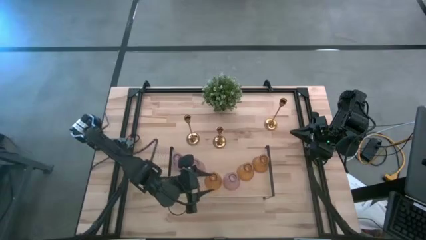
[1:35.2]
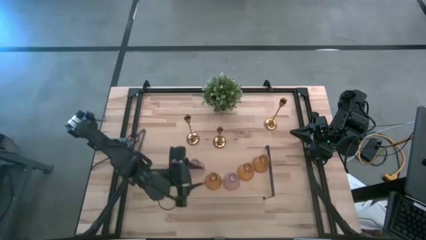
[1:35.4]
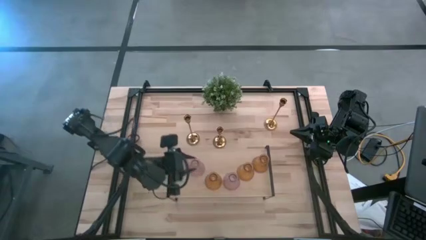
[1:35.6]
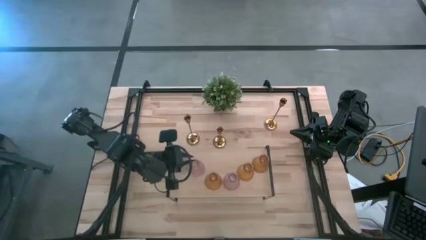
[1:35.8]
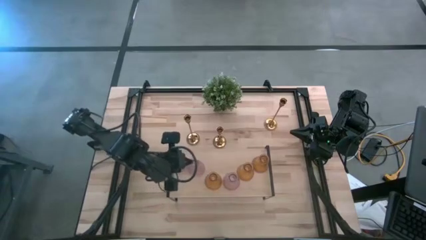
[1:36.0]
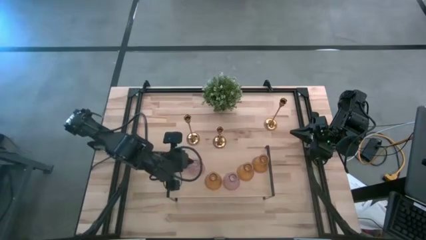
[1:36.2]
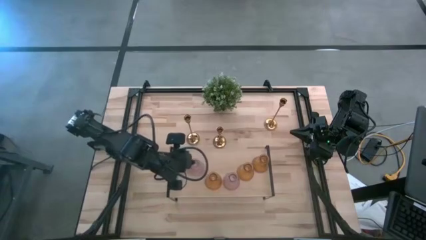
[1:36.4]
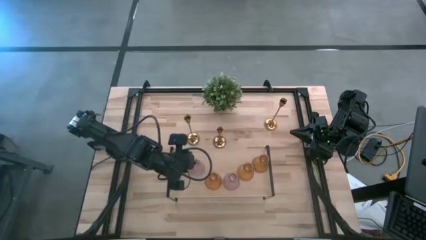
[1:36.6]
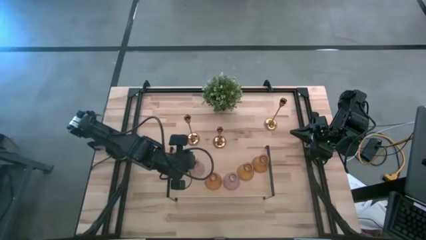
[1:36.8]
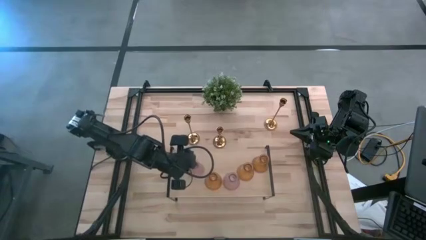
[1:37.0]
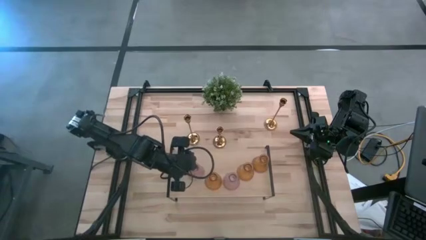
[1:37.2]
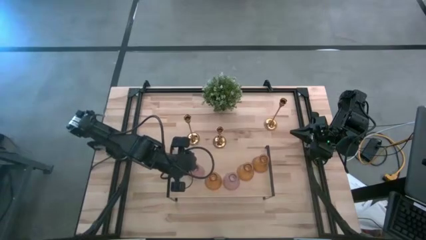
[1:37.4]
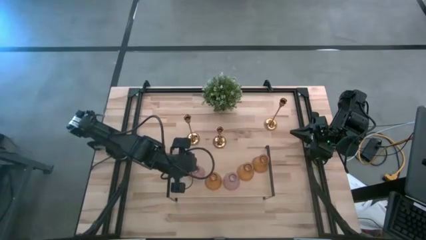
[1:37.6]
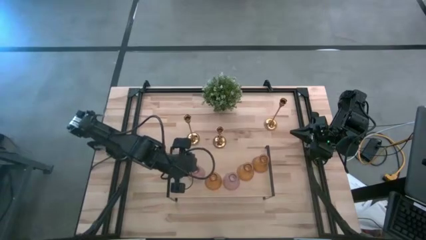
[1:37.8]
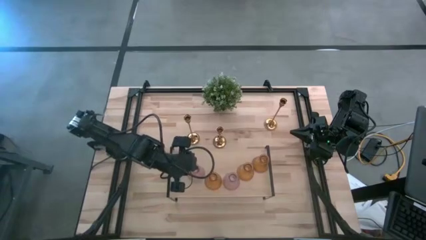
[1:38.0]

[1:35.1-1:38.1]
Task: Pick & Place candle stick holders
Adjust the violet candle holder on the shelf

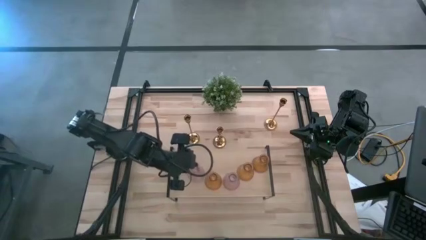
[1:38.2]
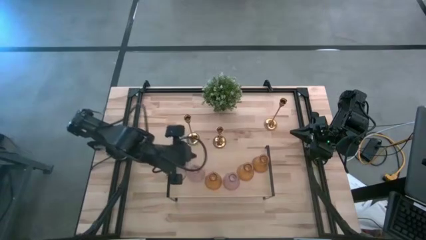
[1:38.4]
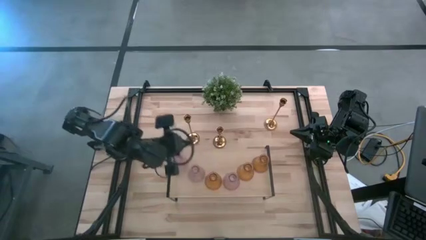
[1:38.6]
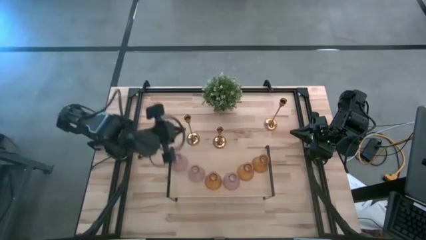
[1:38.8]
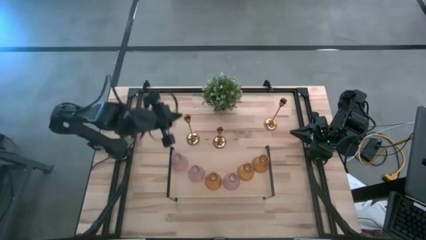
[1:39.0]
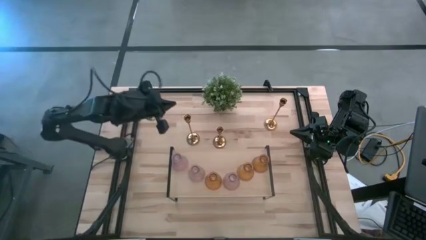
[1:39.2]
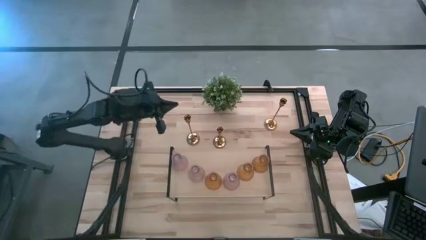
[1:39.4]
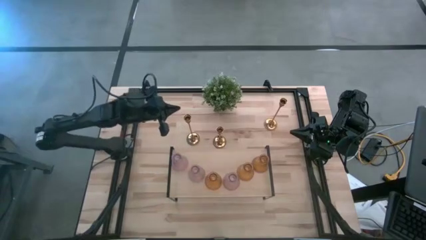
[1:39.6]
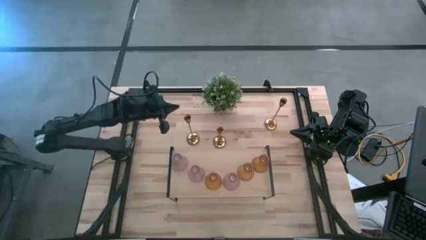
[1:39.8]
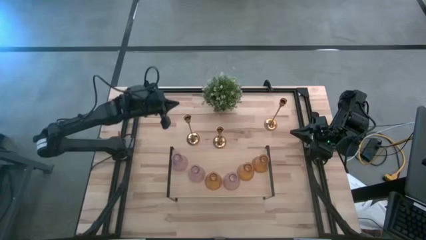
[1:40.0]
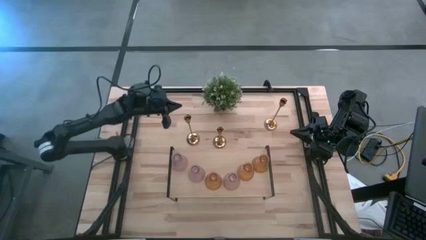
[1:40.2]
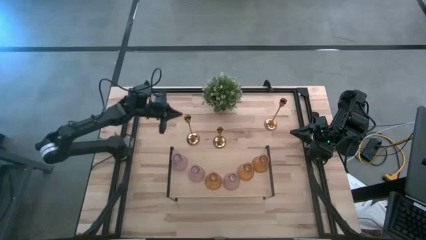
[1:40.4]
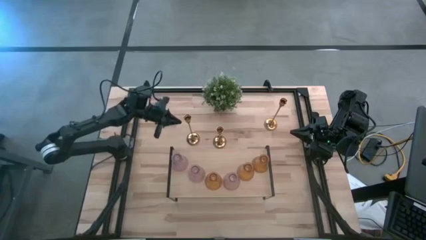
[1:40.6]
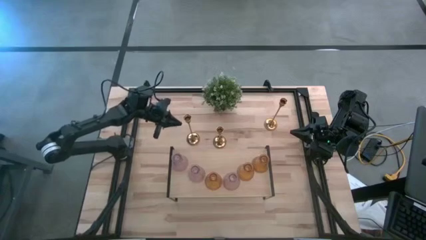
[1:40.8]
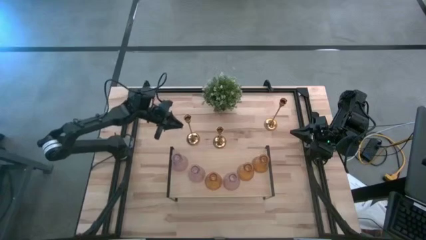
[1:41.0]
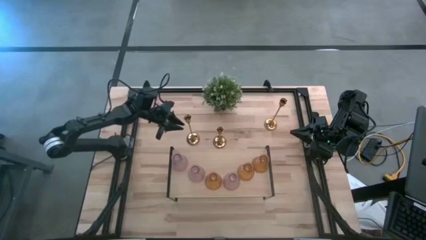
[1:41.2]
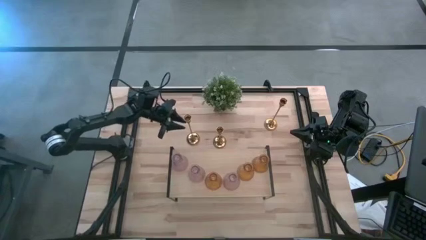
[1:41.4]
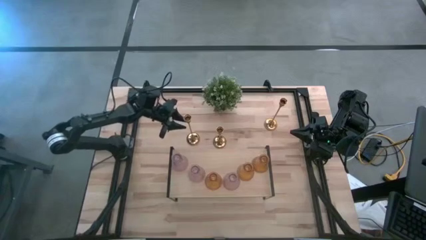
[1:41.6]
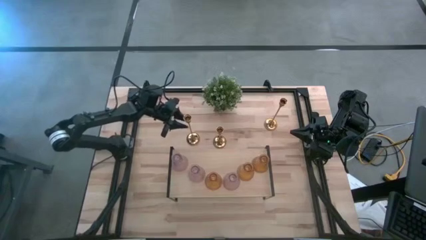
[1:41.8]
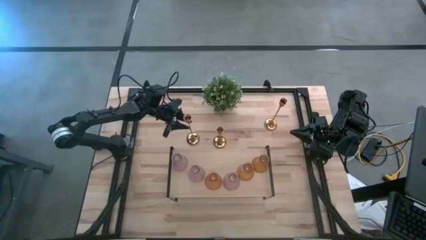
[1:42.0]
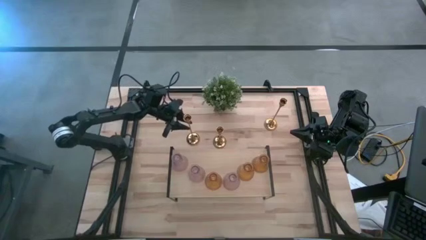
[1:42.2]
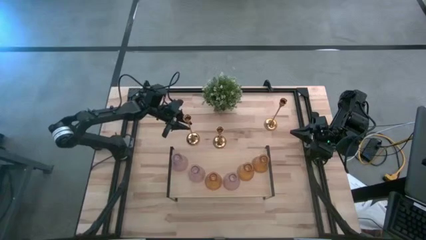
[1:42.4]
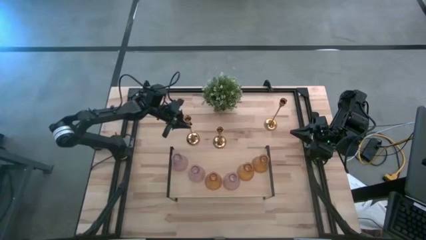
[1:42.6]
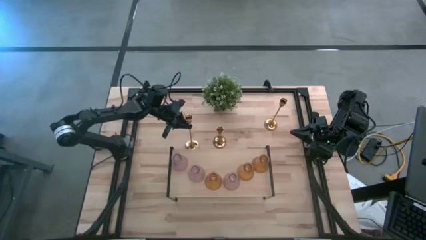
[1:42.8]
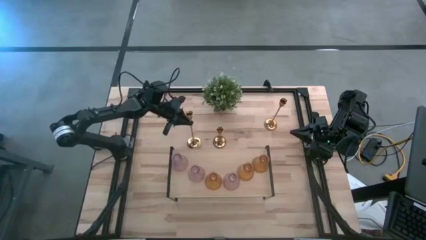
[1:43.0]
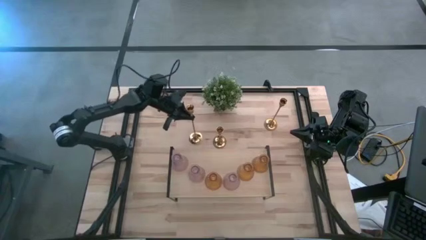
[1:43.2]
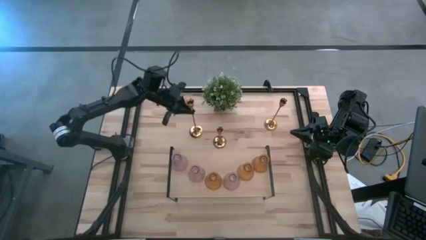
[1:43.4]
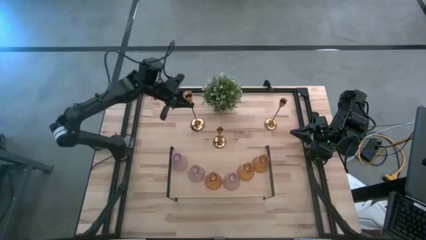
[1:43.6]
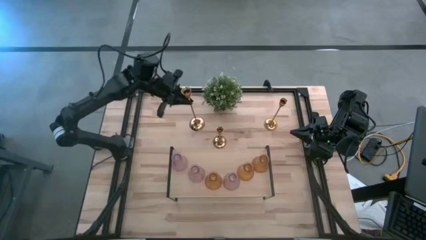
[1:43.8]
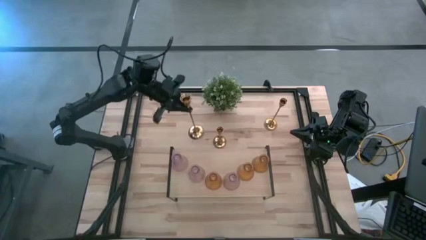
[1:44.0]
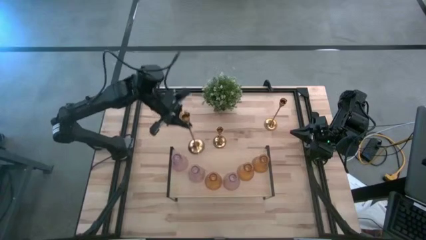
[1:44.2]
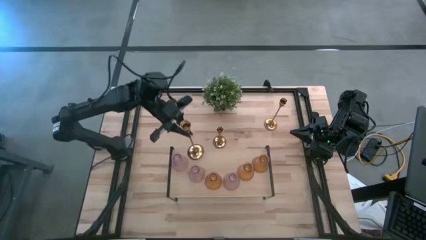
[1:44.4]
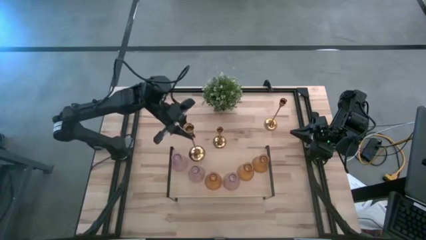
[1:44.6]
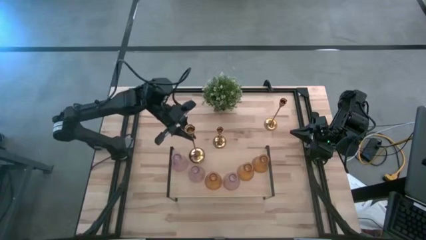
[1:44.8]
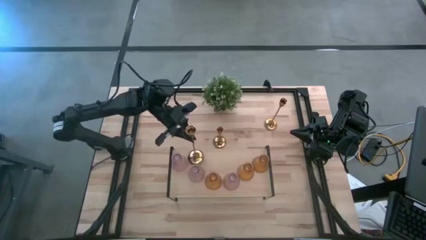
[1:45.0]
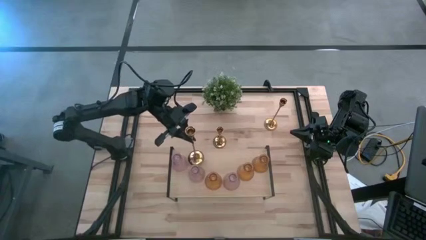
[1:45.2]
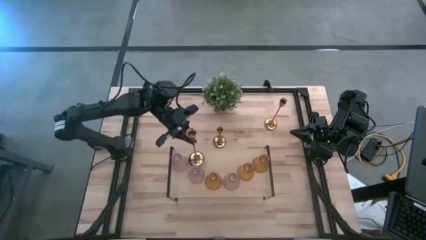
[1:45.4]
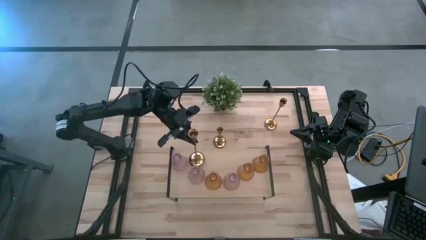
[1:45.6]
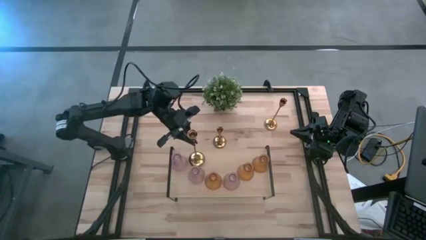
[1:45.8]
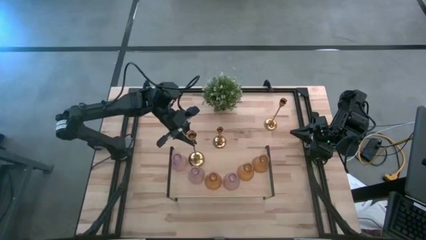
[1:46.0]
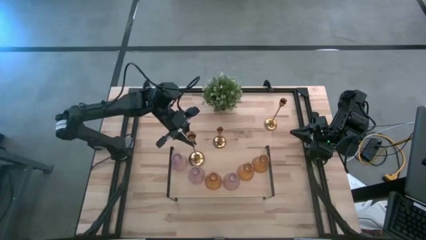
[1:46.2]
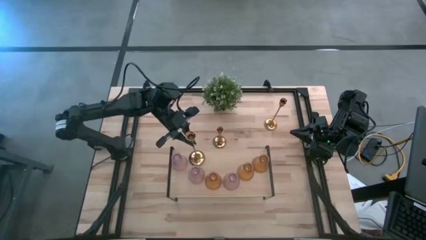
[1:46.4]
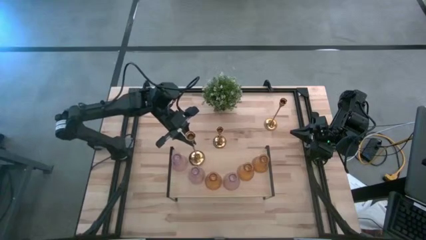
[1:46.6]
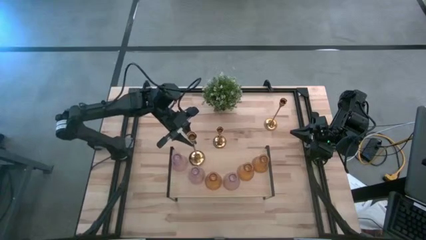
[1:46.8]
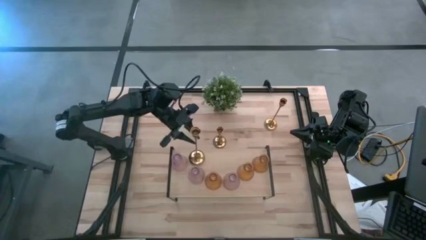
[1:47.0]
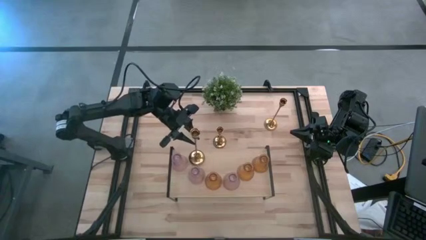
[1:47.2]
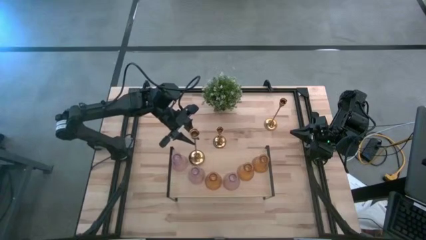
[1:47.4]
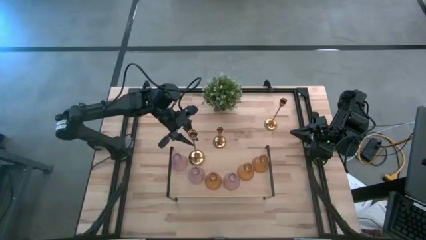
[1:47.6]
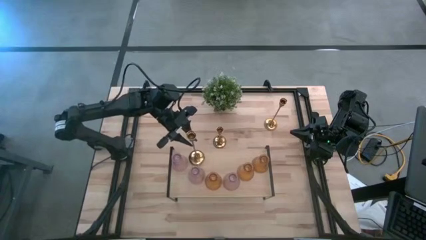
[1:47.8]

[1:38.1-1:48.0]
Put the bottom left gold candle holder on the shelf
